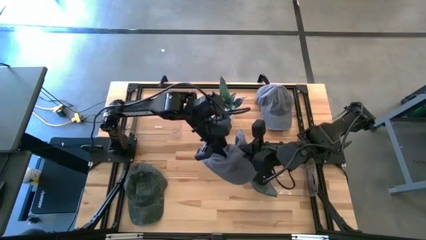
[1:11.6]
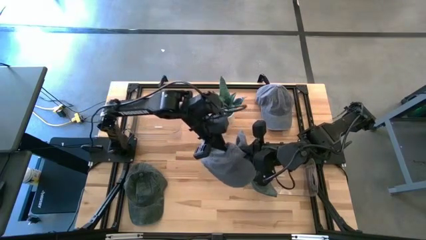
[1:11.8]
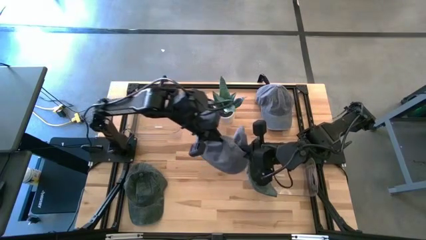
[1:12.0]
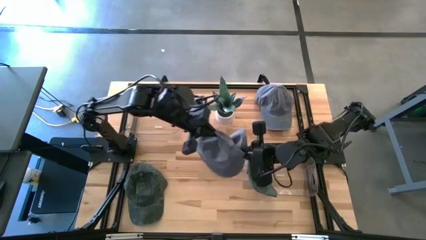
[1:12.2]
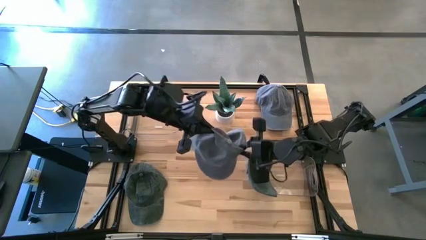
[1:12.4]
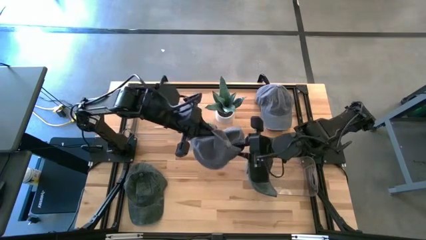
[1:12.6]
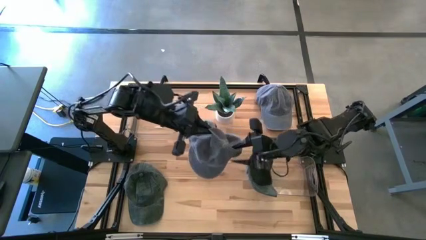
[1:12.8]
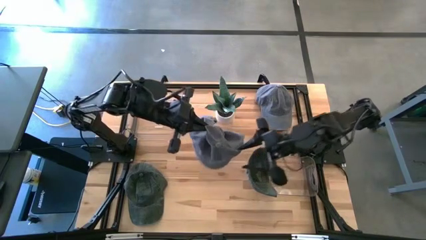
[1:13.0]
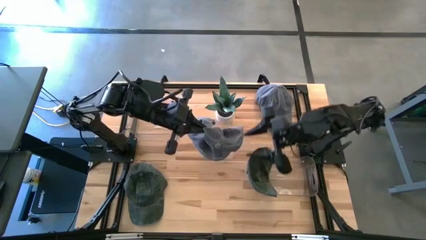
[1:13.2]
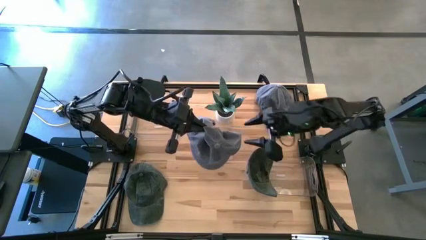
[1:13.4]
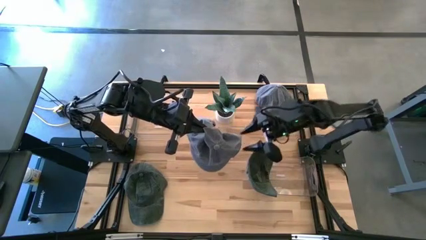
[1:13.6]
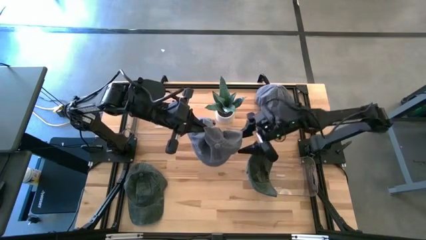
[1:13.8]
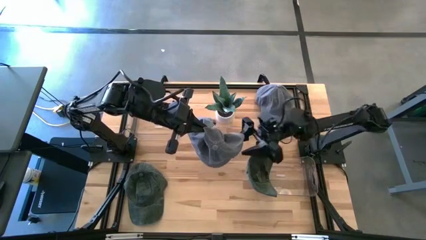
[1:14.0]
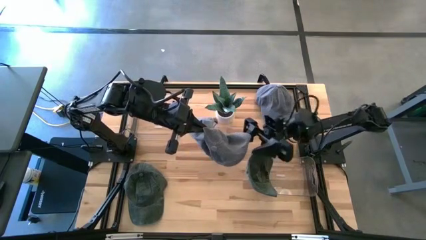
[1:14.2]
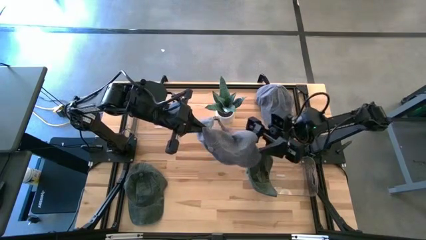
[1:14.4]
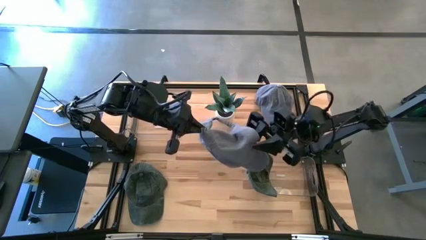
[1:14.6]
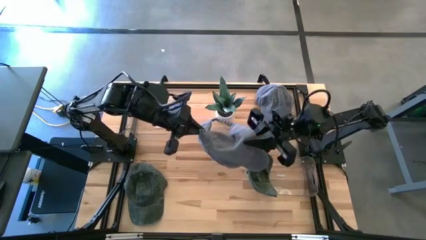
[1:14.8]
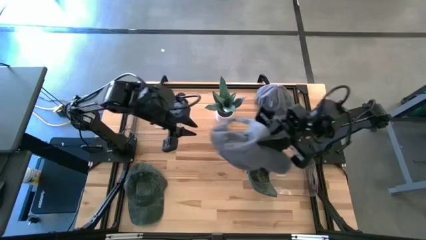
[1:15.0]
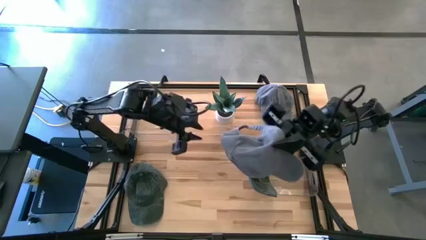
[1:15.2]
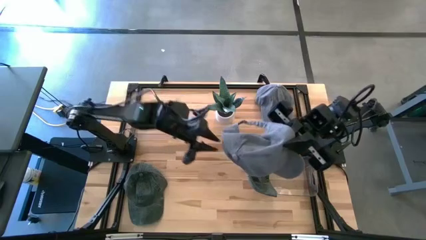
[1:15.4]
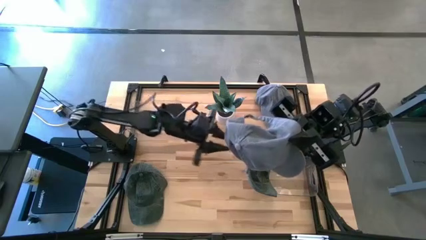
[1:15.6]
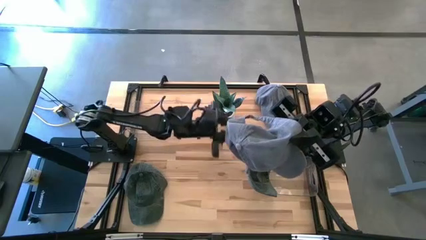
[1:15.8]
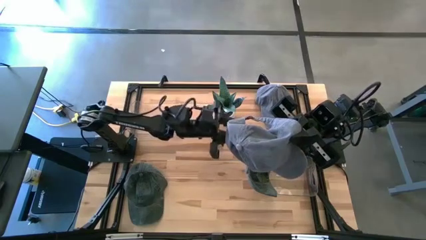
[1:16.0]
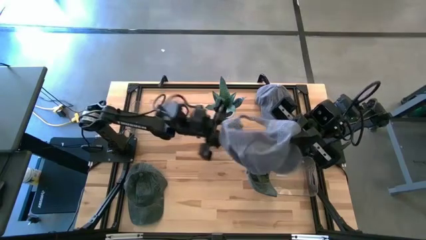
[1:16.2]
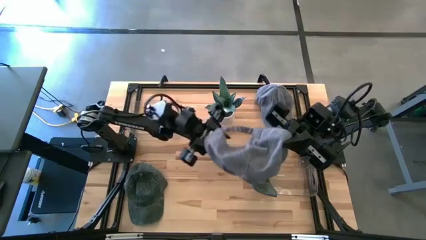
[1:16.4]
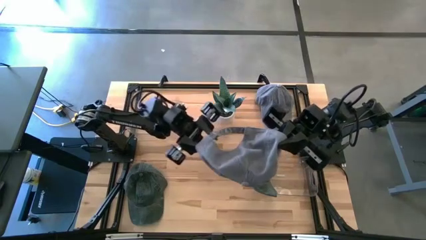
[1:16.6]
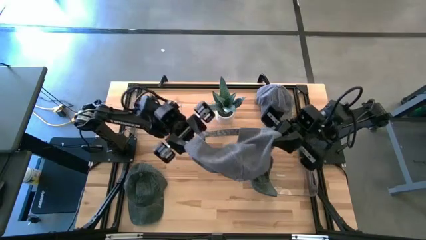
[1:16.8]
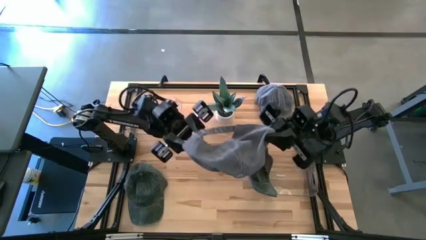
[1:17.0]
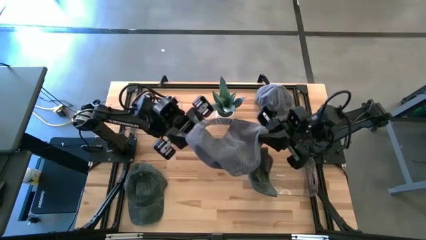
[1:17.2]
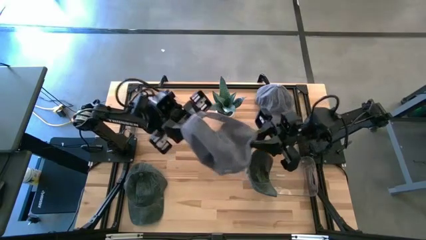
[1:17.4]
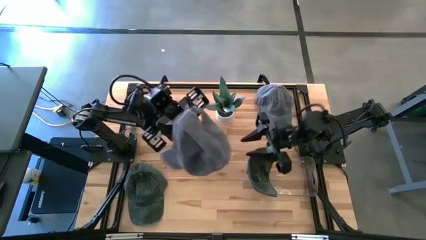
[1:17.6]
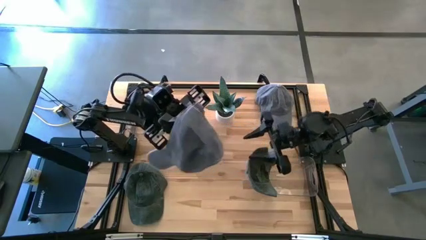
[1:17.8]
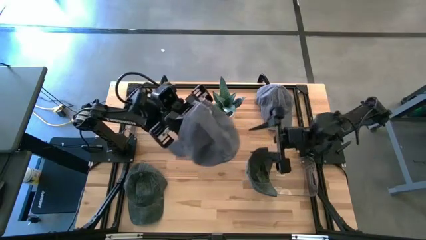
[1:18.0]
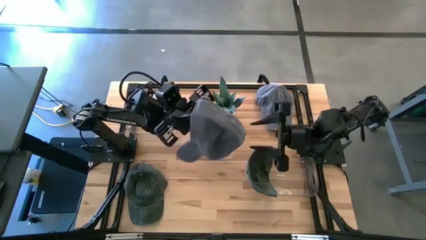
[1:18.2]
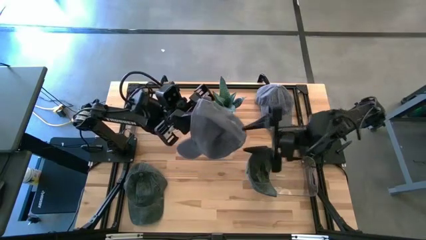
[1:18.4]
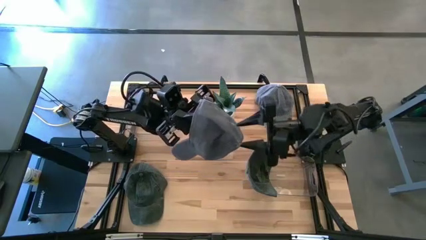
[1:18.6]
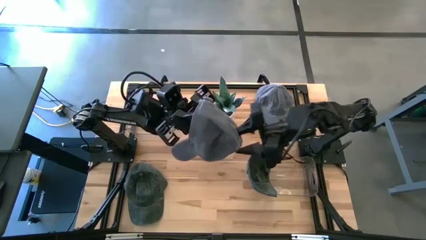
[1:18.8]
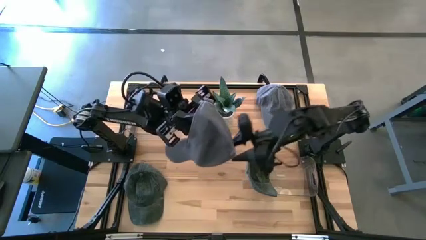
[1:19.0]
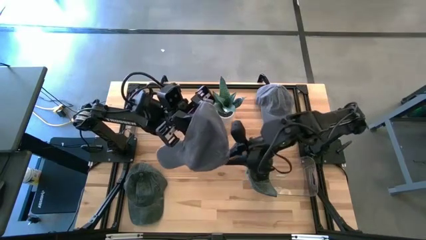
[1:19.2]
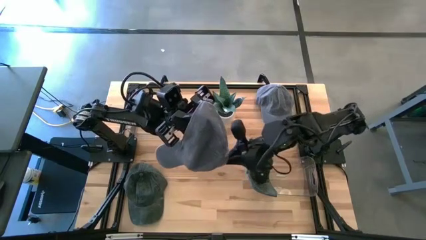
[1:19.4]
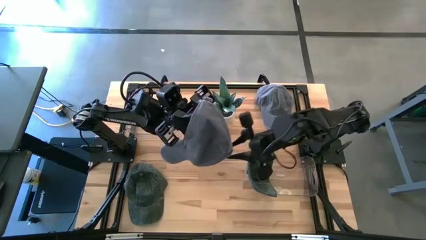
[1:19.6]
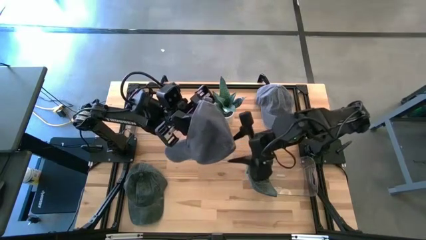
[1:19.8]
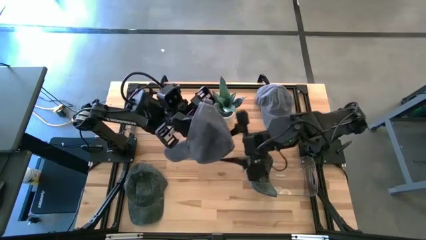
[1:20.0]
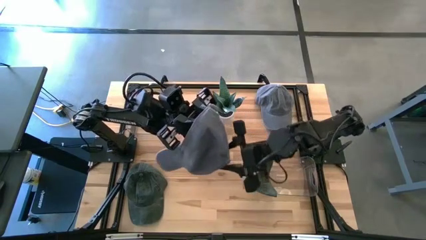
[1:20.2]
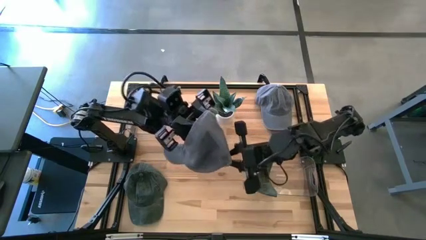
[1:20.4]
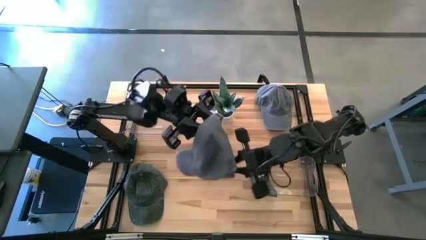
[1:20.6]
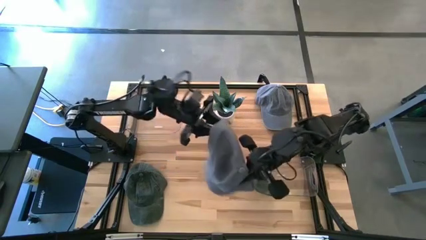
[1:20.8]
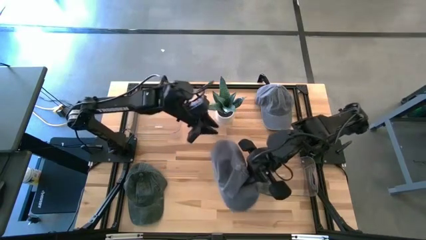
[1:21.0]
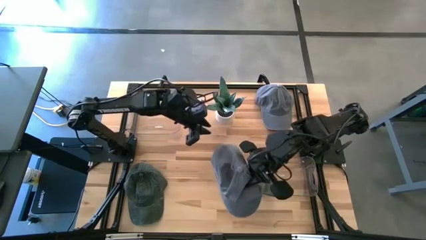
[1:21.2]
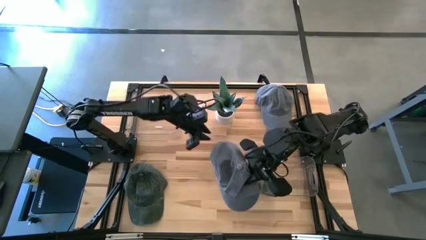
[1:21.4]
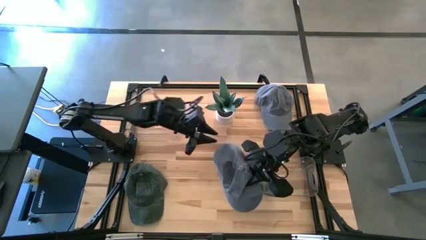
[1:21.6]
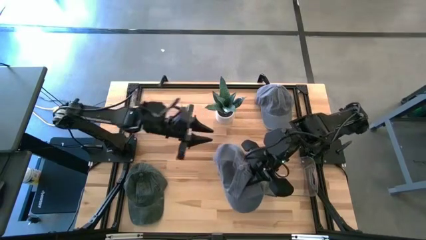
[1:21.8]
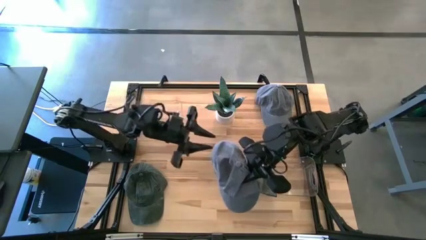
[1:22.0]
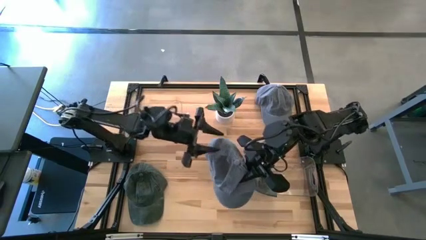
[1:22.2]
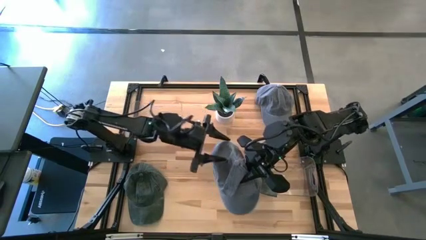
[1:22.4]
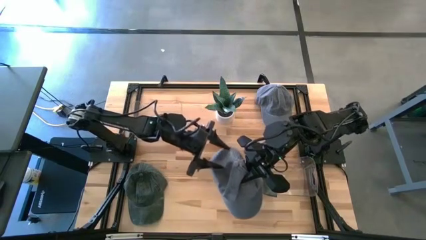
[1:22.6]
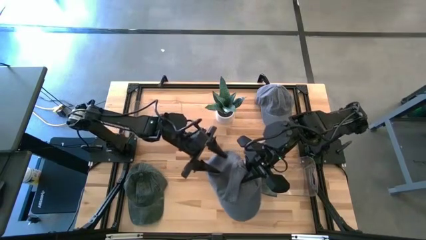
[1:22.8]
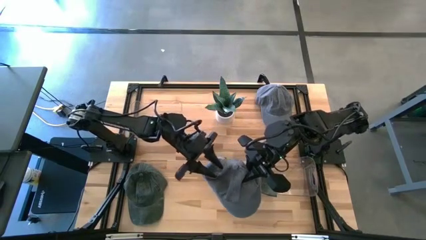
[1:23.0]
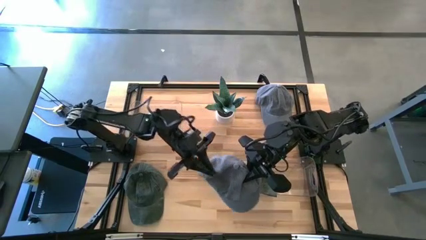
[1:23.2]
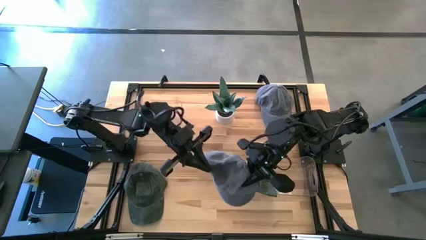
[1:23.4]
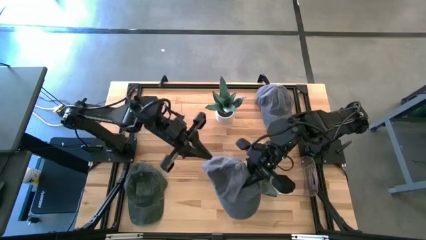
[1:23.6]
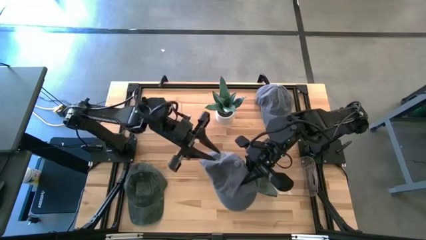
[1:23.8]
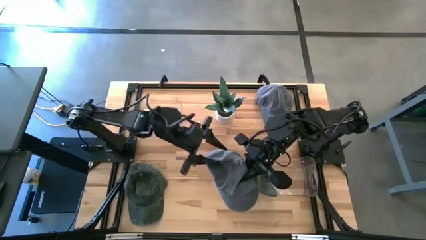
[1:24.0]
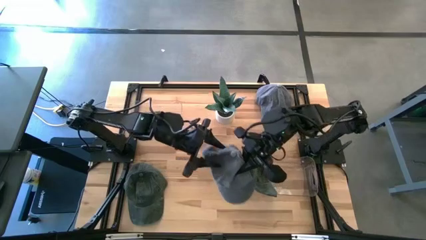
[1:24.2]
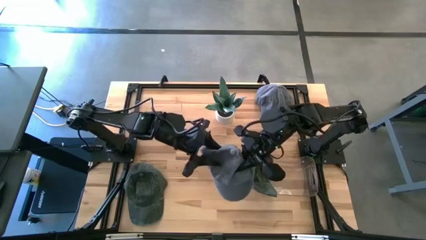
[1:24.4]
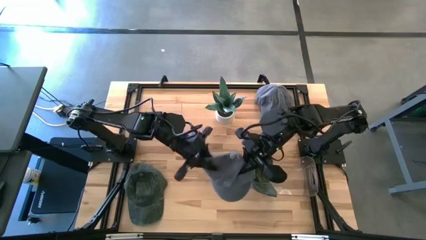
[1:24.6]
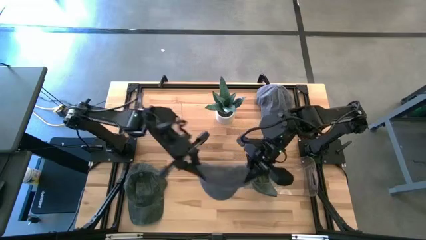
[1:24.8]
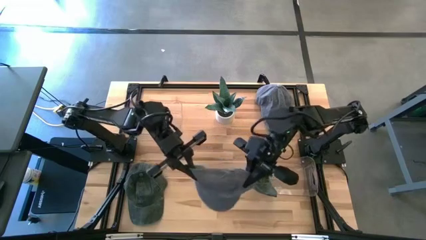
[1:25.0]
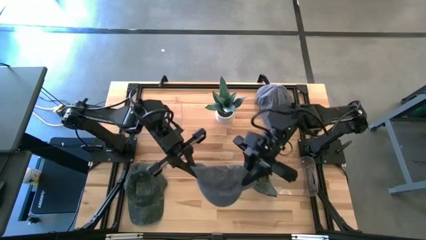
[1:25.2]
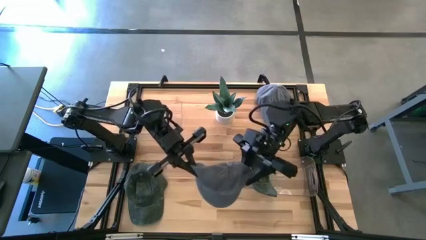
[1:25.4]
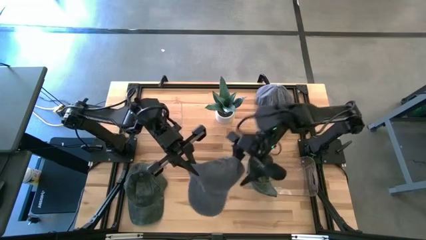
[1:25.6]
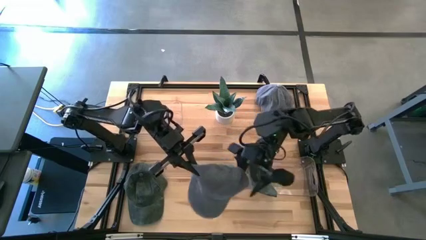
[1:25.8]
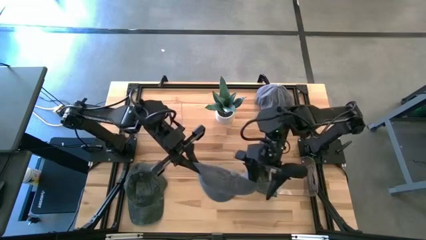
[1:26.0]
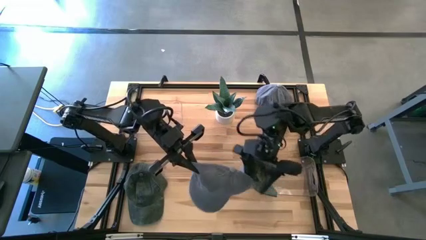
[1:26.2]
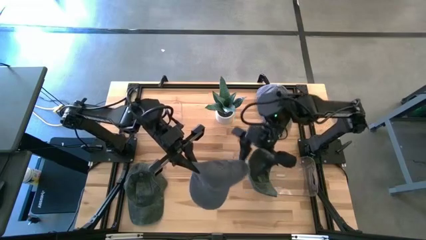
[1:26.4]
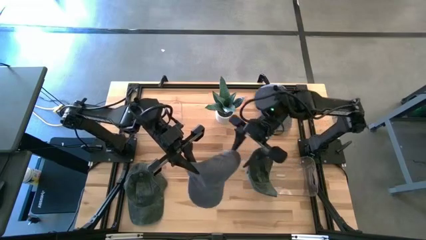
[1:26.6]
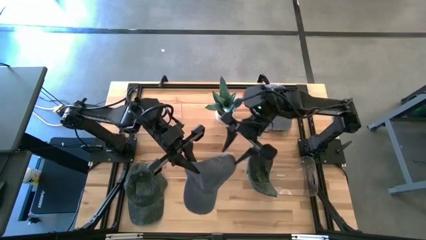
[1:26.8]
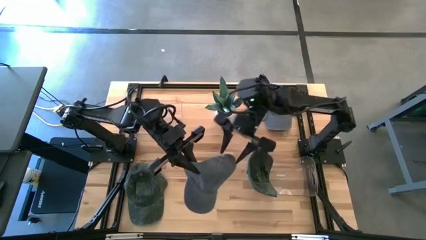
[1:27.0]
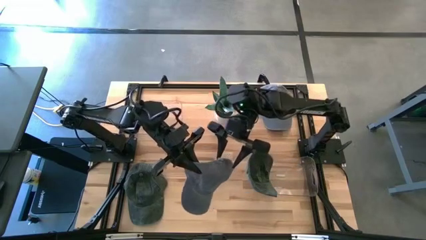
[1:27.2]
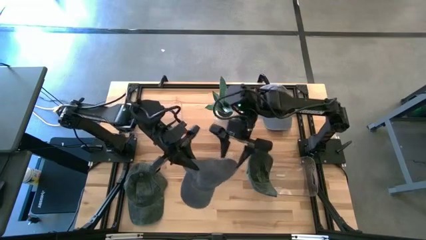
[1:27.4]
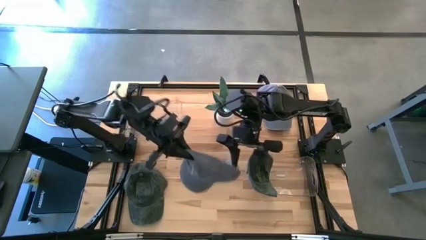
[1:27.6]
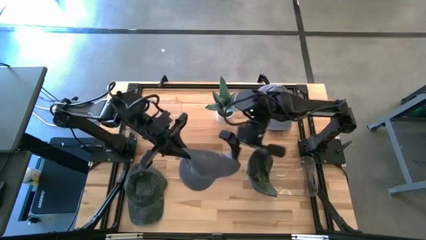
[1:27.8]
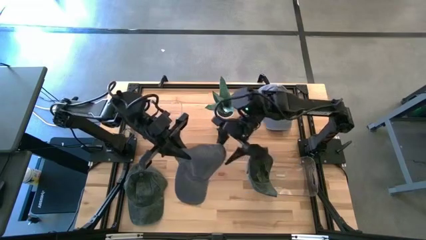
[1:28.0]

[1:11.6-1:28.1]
Task: Pick & Place hat
Put the left gray cap into the left transparent bin
